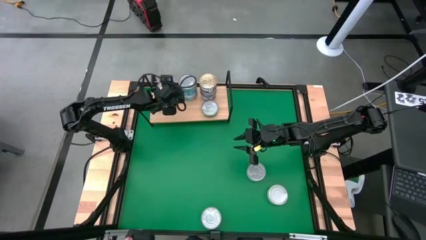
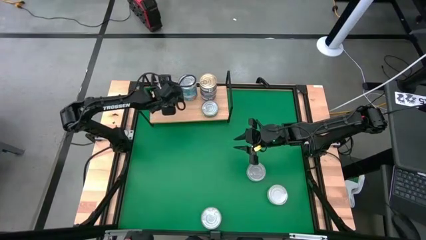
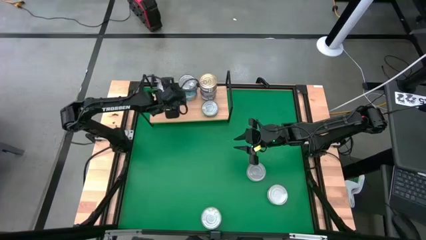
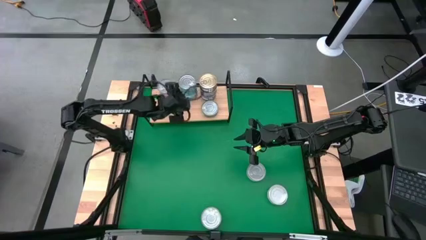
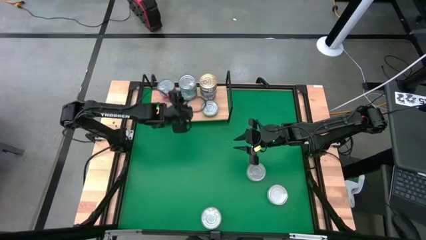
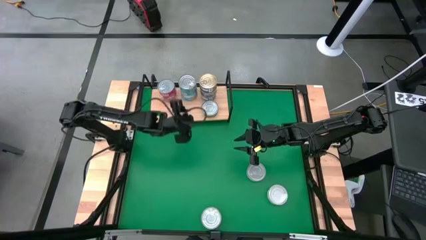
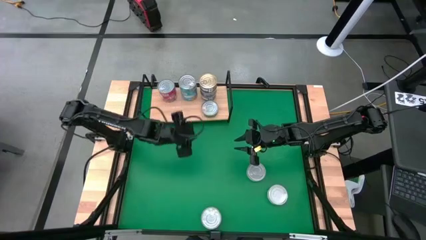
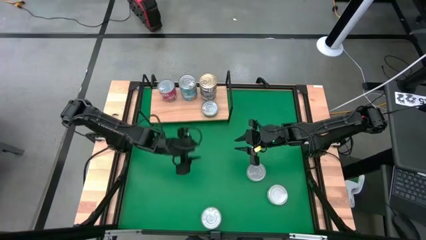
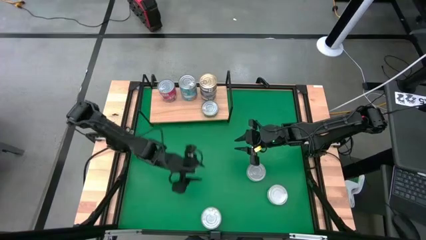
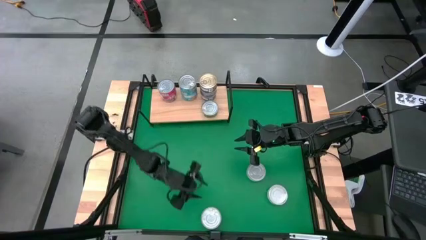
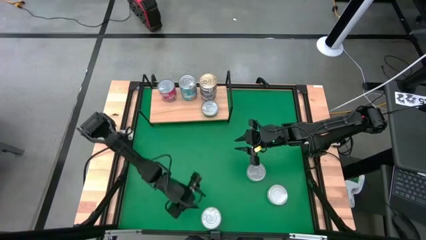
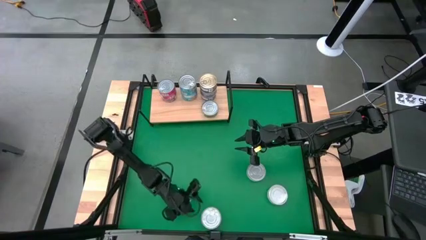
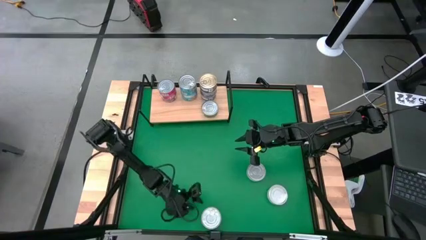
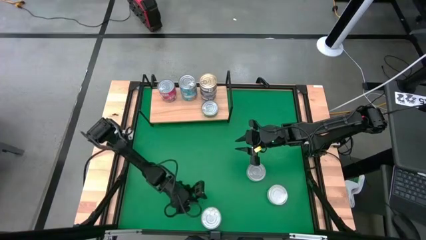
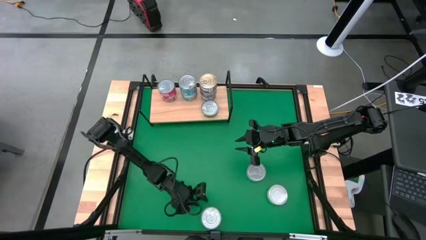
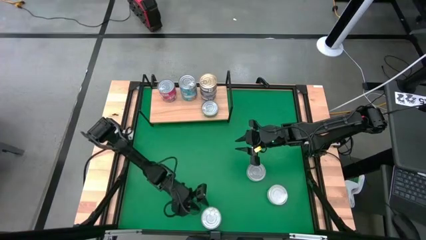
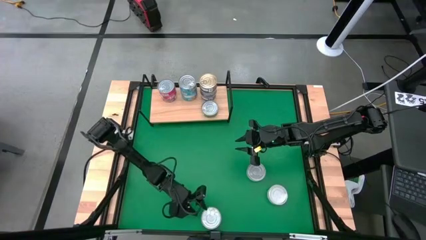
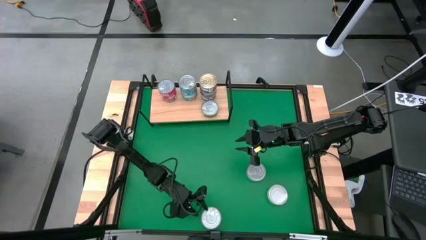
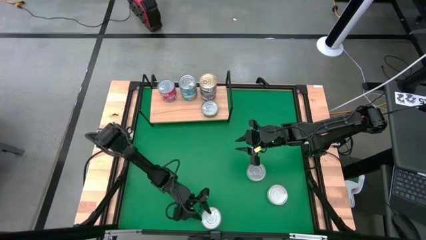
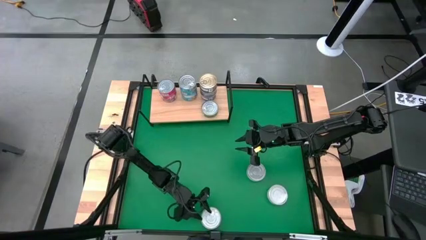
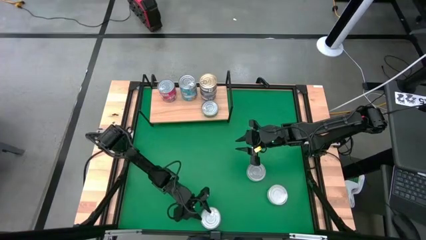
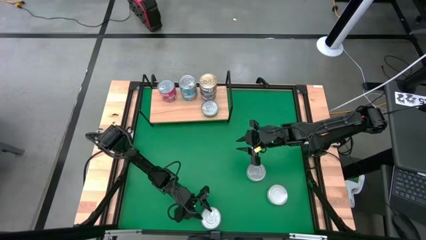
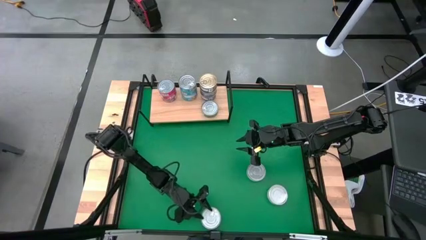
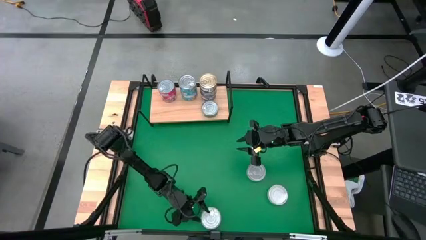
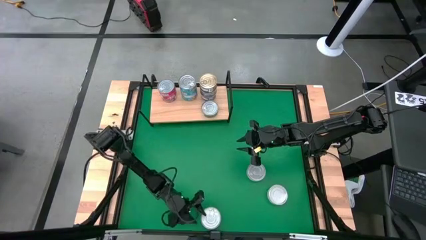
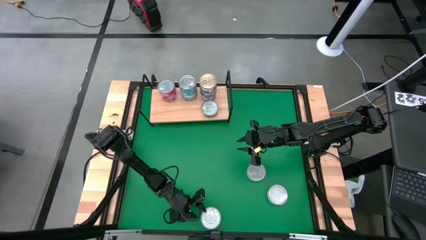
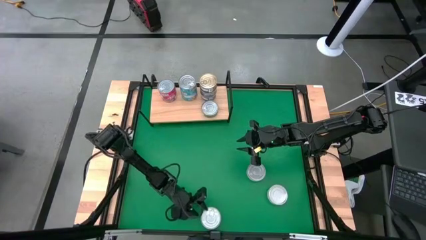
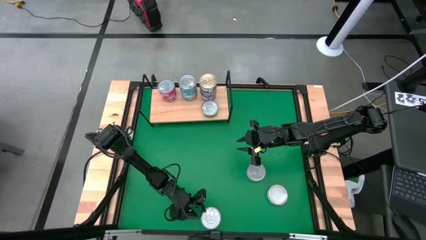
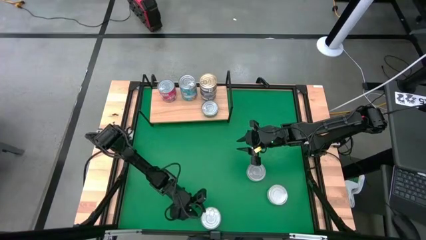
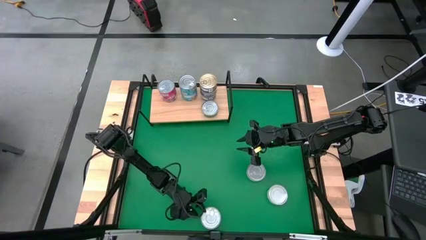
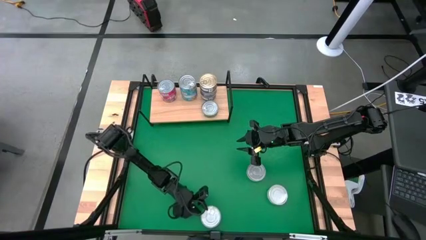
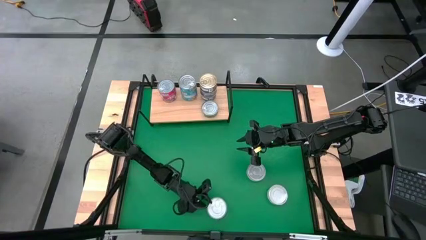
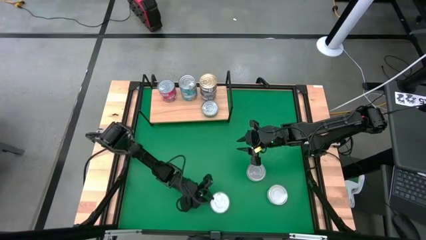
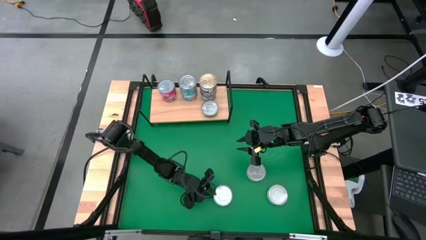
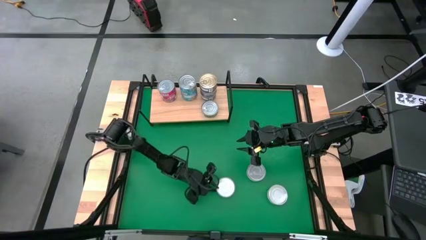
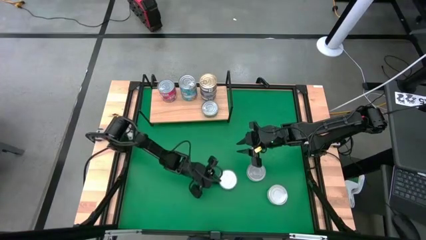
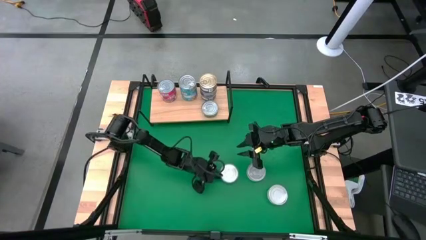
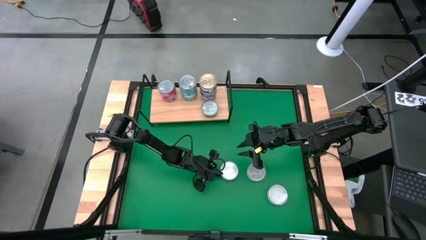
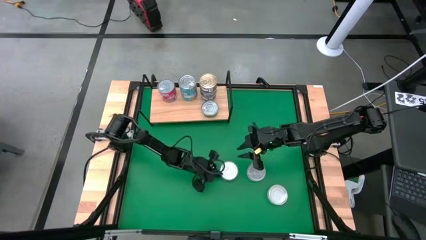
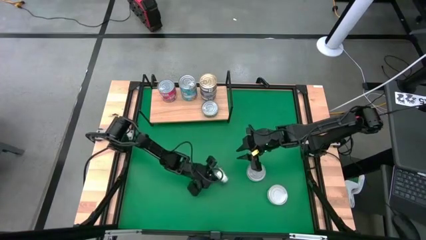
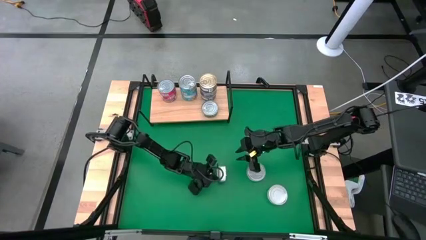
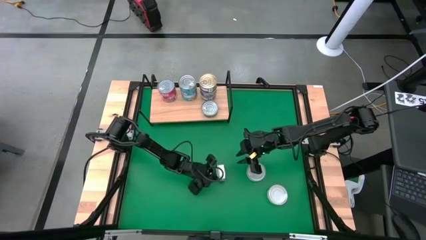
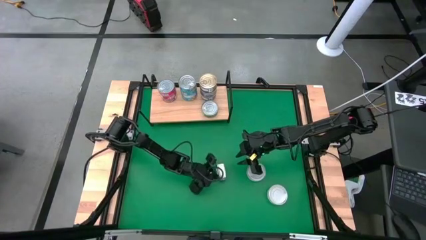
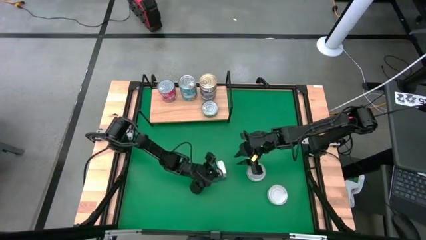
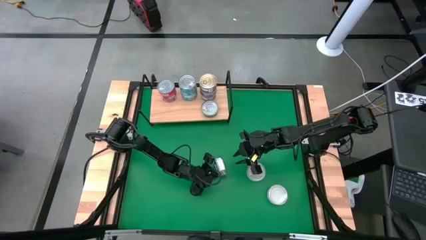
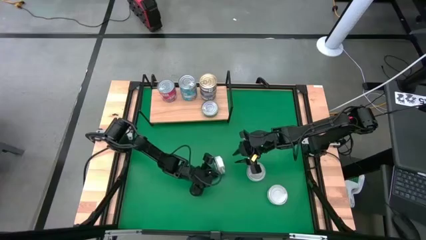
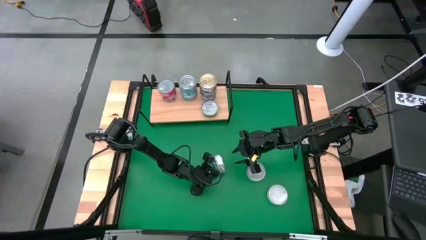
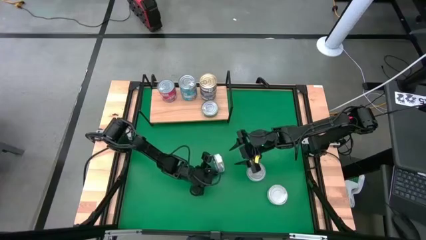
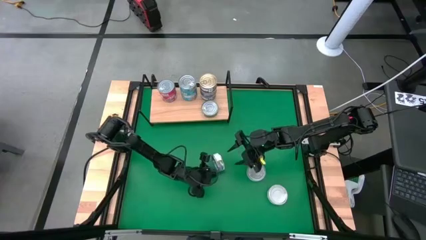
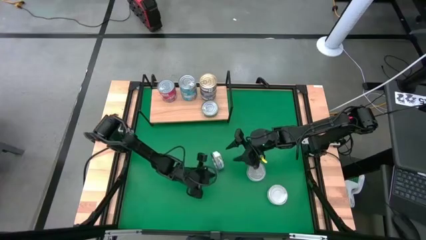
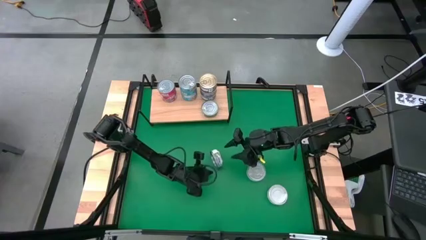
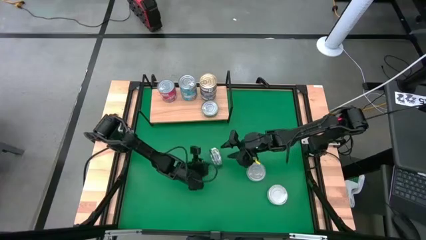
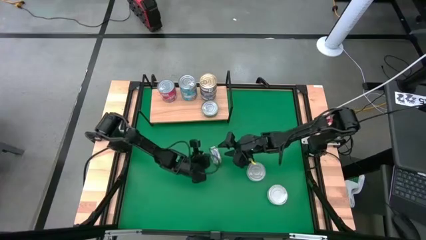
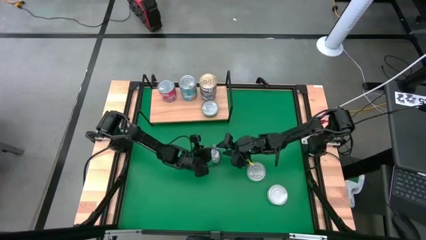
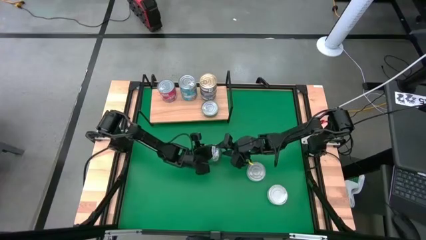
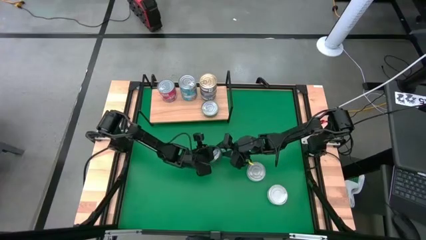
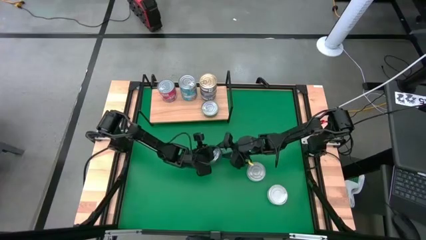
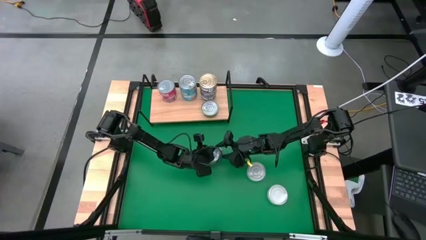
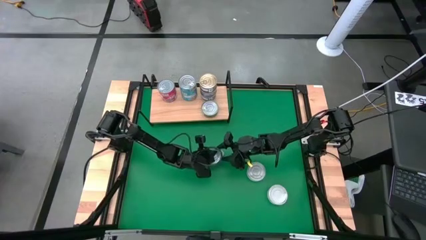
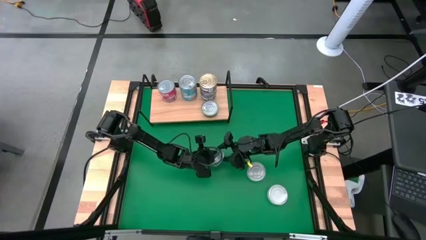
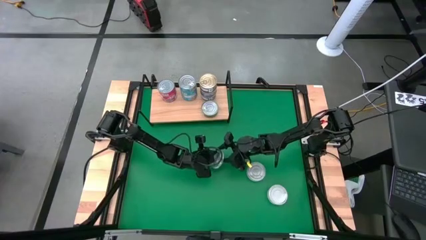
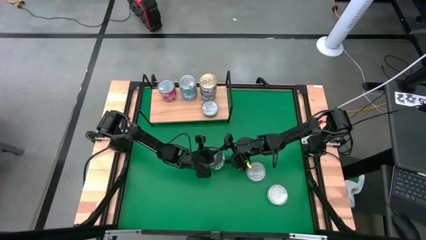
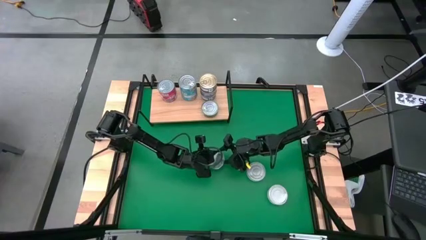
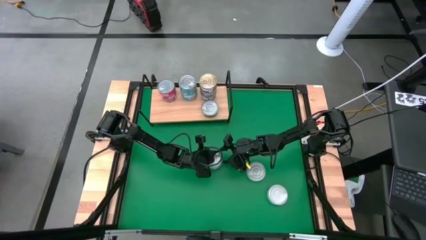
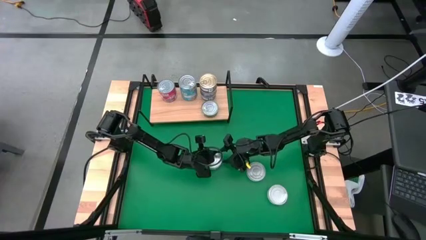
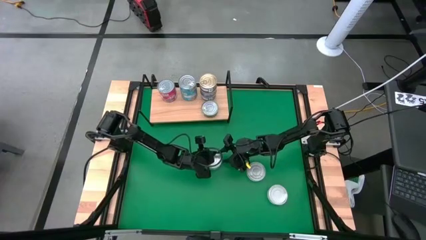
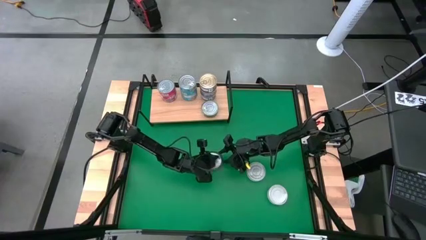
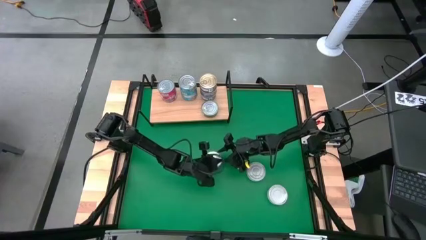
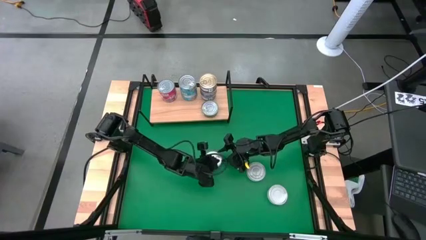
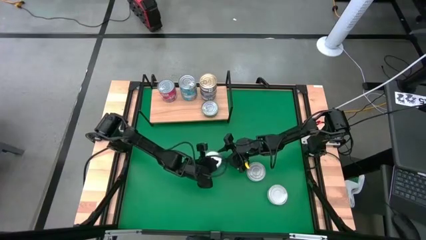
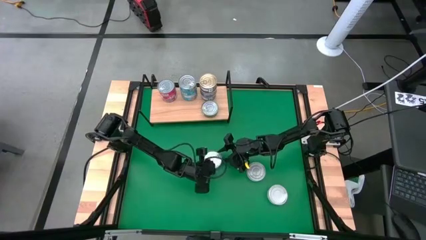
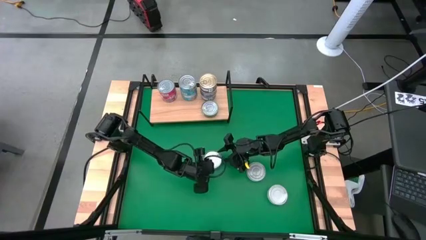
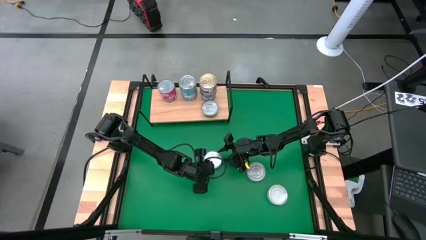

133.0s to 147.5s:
Task: Stack canned seafood by type on shelf
Stack the green tuna can on top of the other green tuna can on the shelf

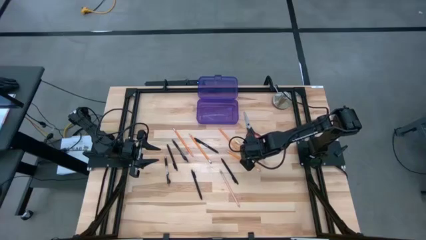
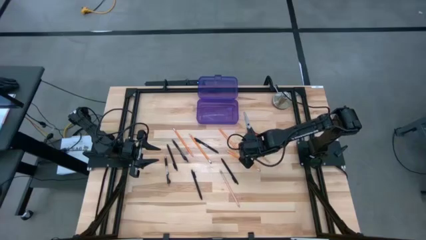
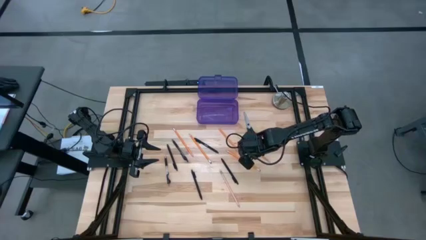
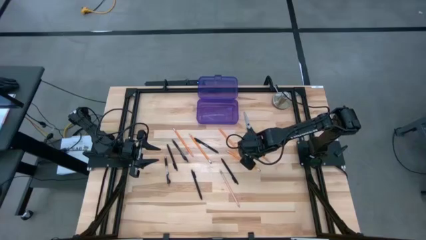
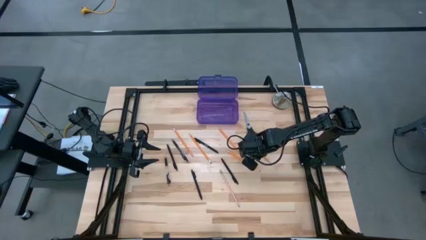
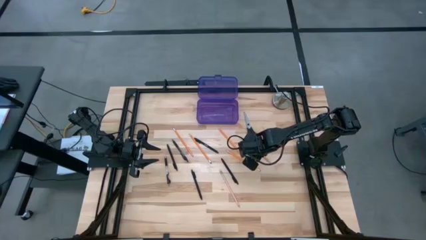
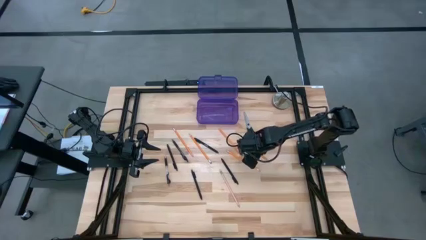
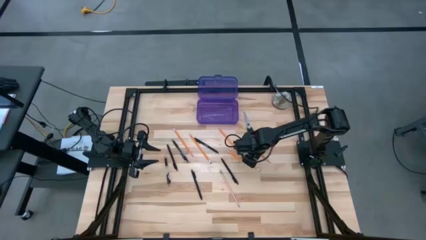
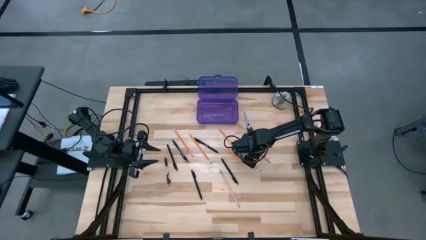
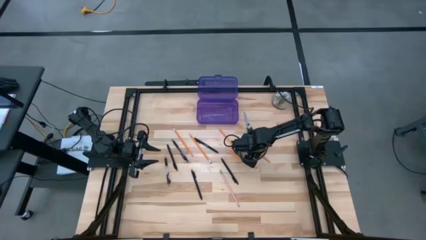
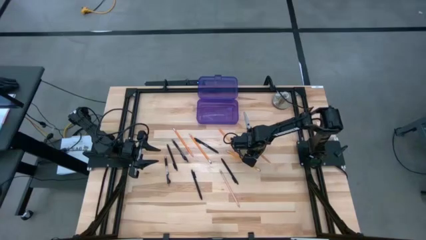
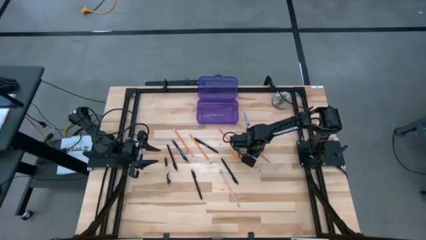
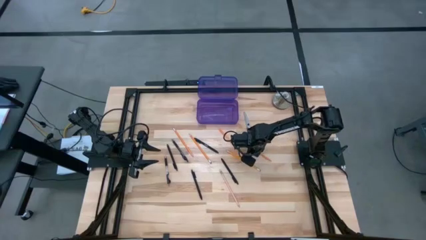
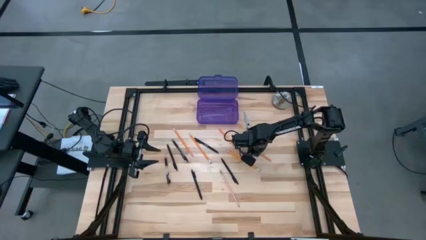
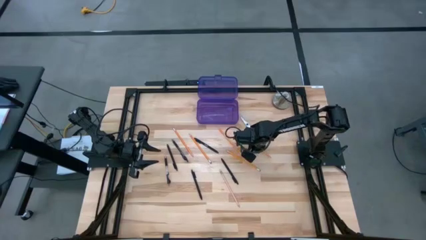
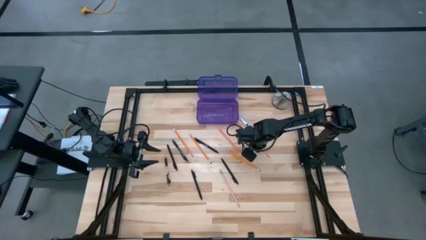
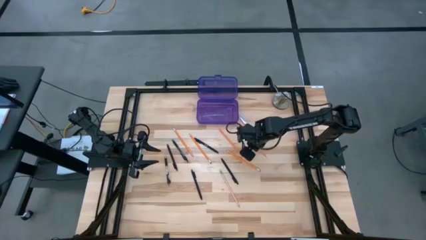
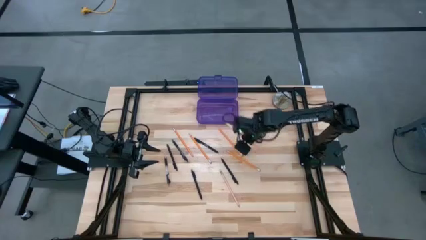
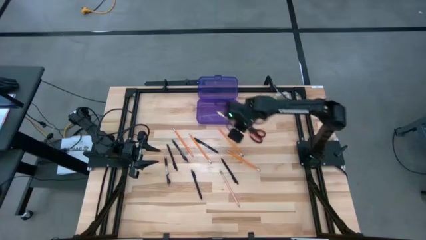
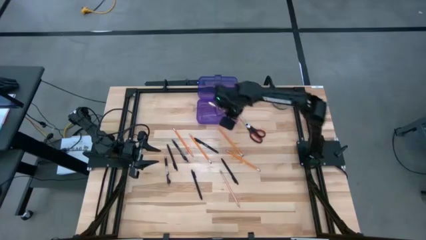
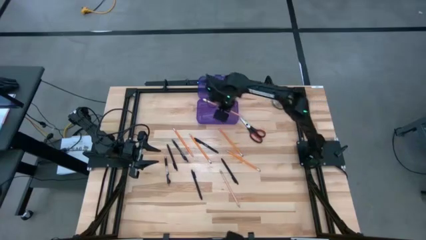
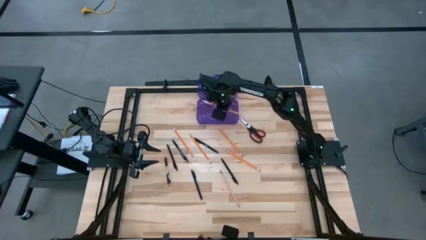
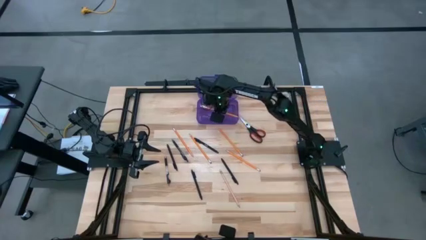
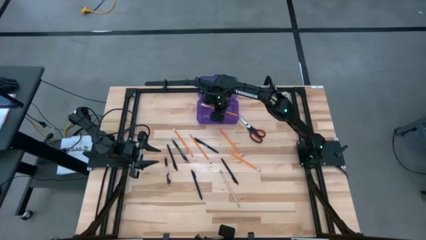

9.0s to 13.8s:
Task: Pick & place school supplies into a supply box
Put the yellow pencil into the violet supply box
